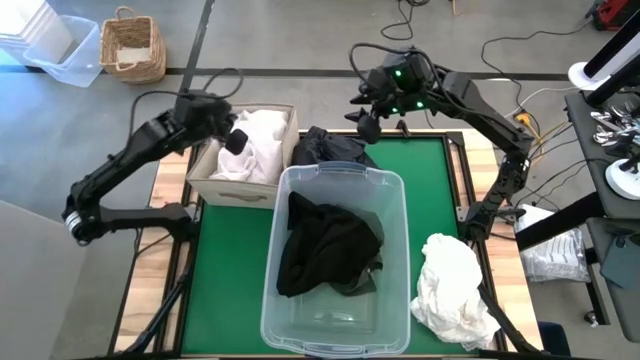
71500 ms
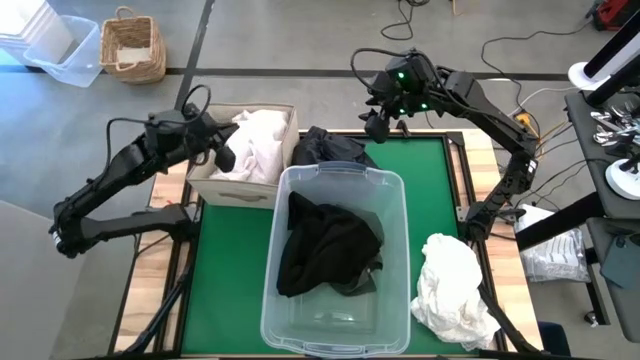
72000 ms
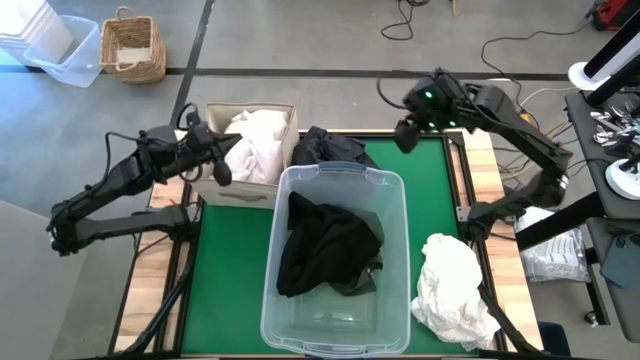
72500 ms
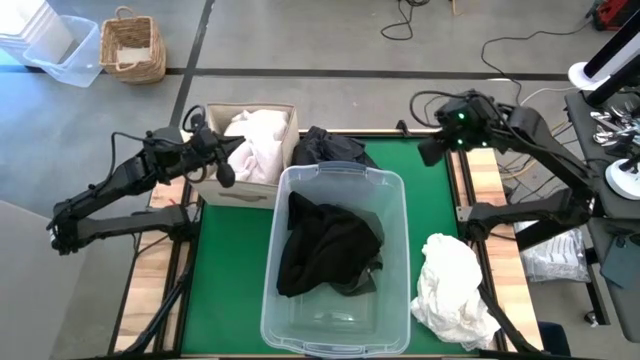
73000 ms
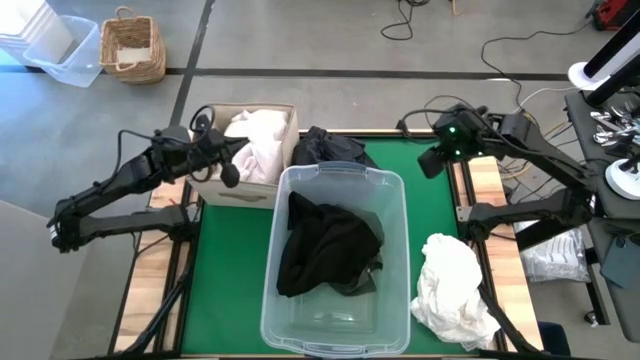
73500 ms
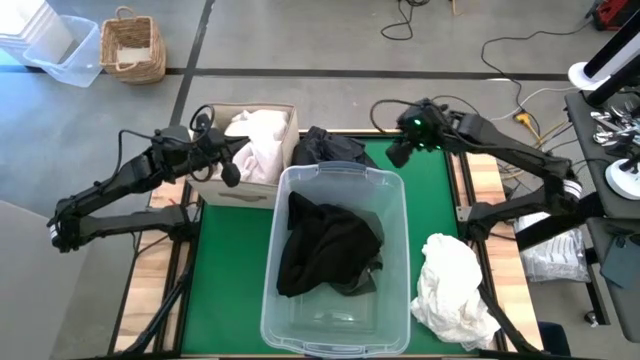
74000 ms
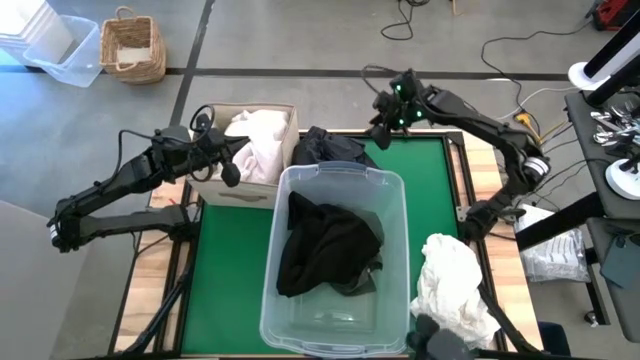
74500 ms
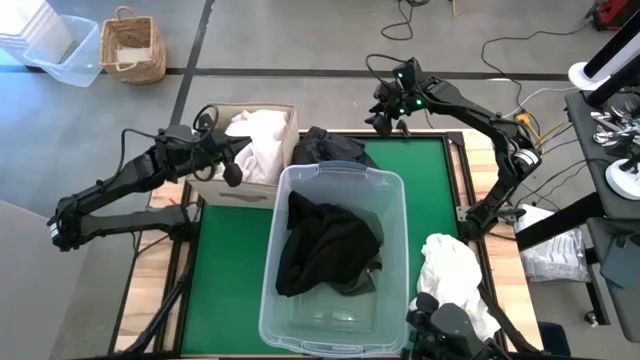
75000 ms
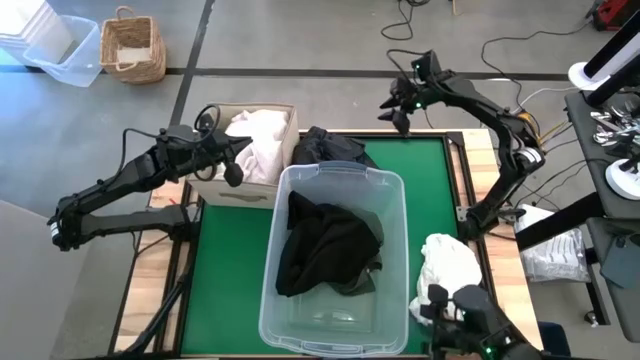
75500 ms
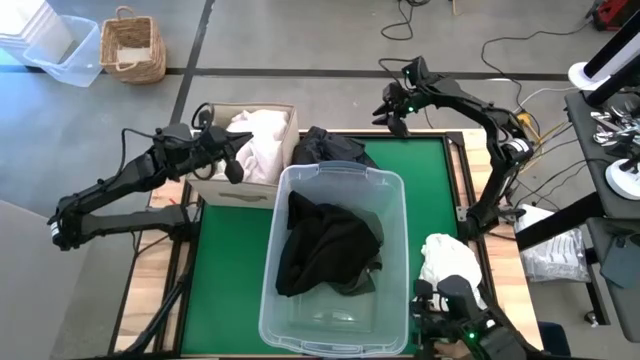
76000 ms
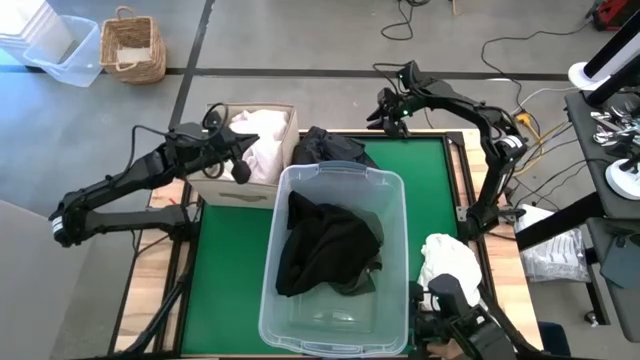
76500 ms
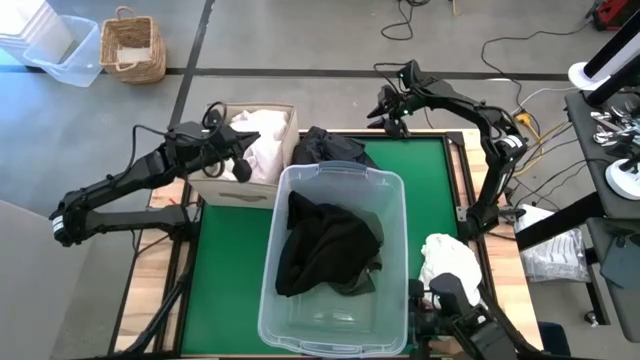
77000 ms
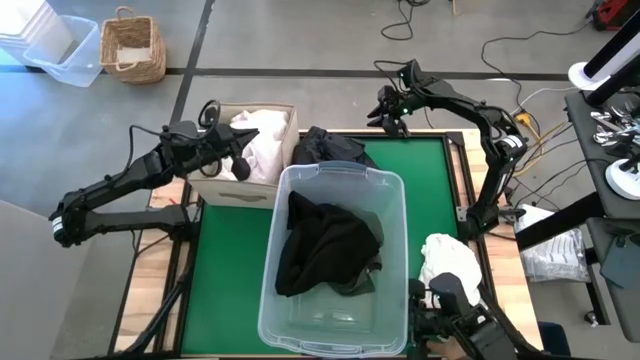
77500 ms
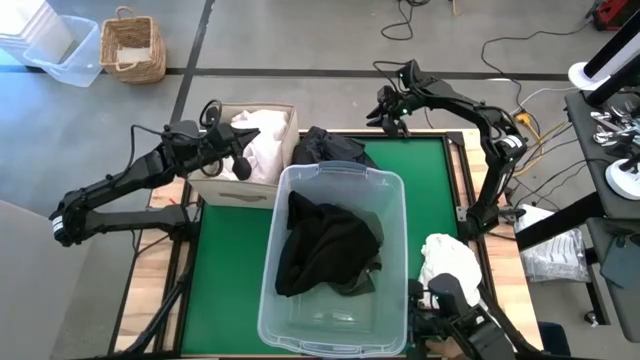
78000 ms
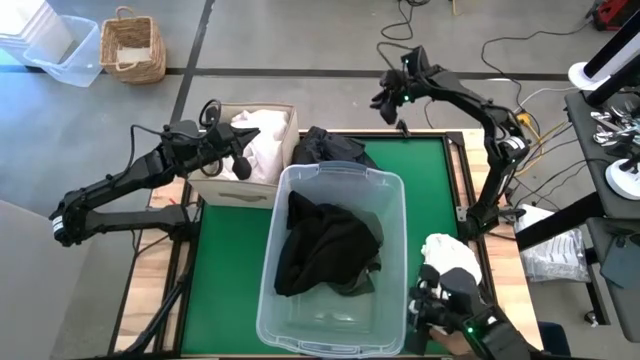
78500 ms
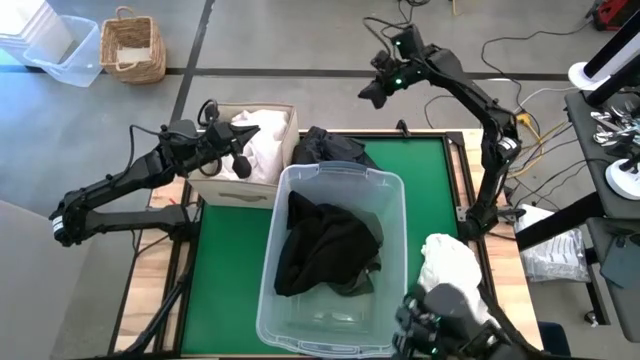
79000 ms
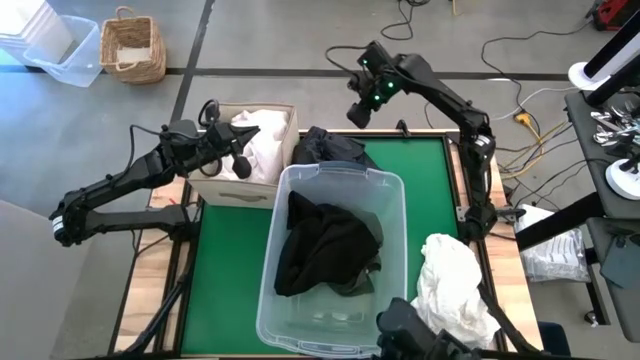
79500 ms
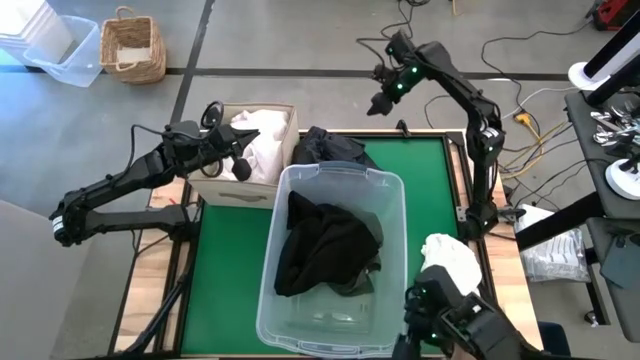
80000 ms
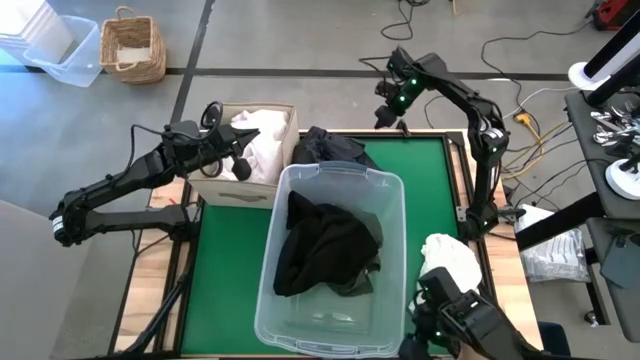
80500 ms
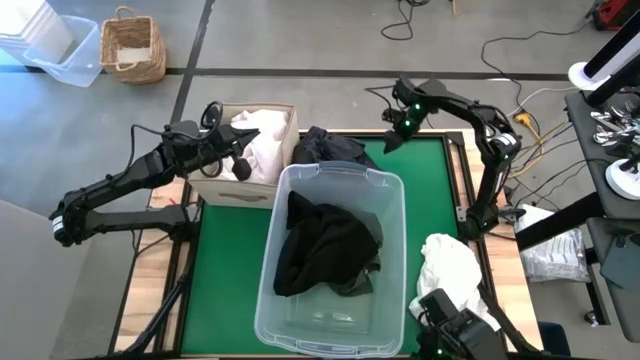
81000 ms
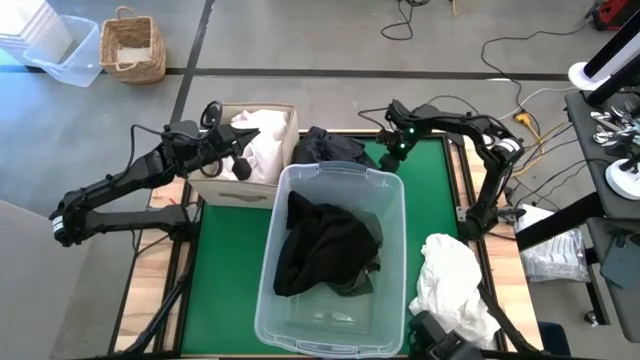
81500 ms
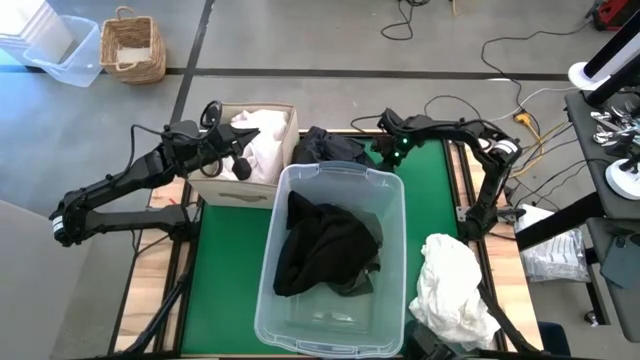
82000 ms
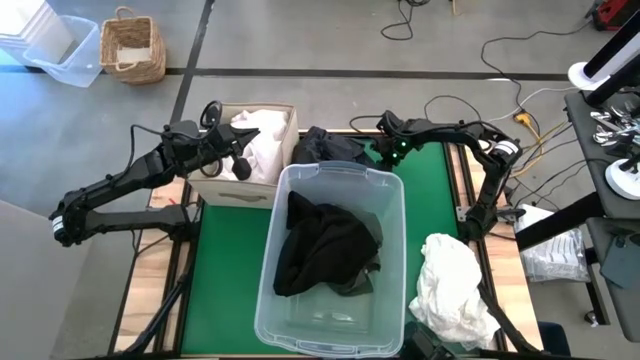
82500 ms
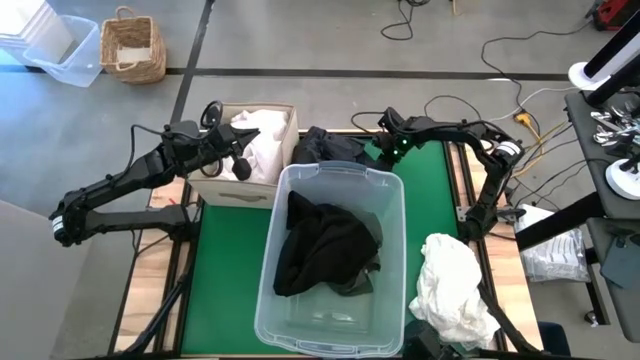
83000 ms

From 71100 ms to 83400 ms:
Put the black shorts into the transparent bin

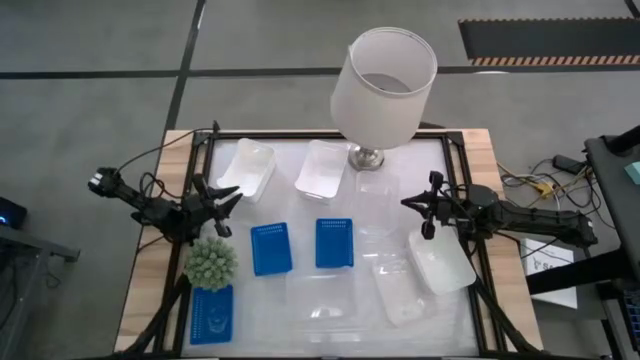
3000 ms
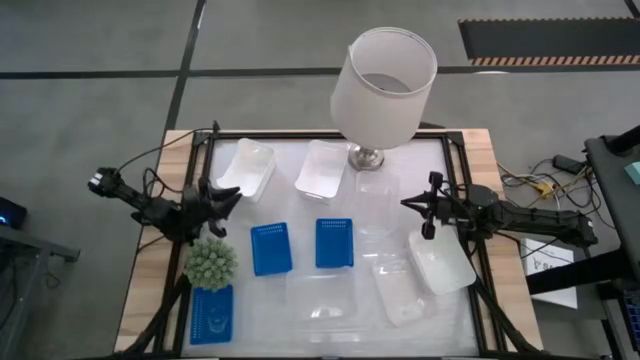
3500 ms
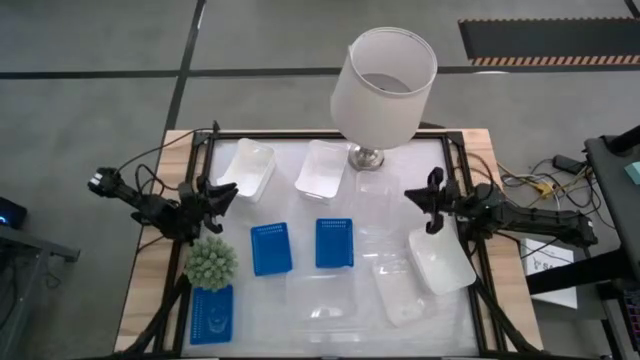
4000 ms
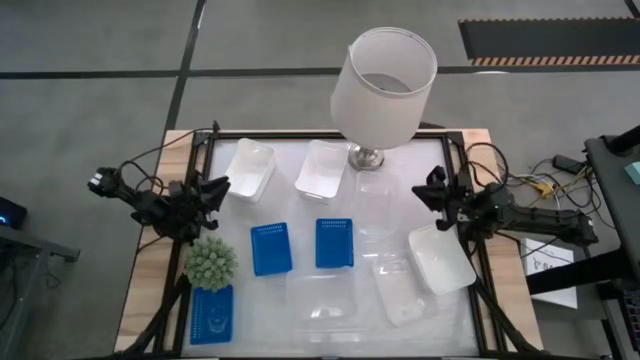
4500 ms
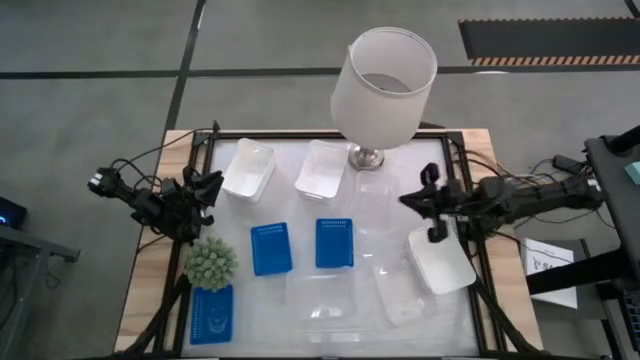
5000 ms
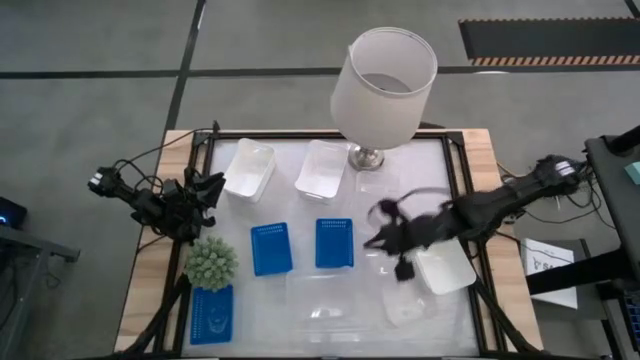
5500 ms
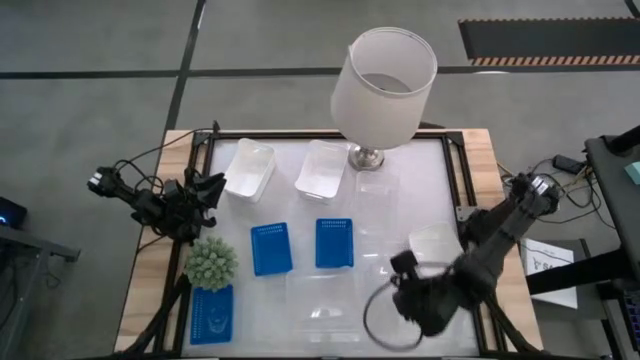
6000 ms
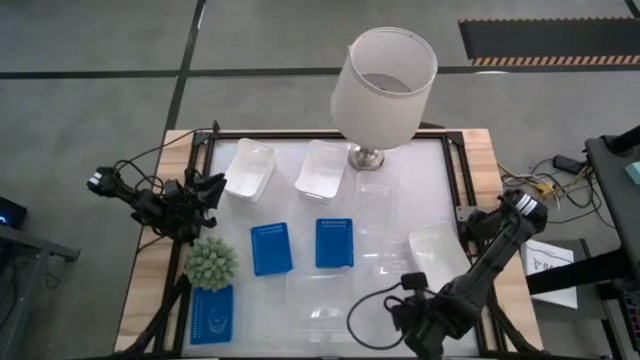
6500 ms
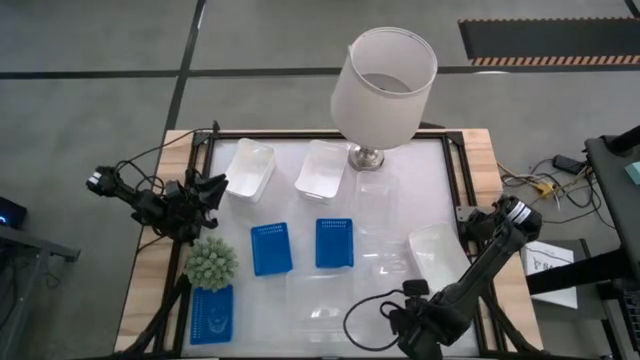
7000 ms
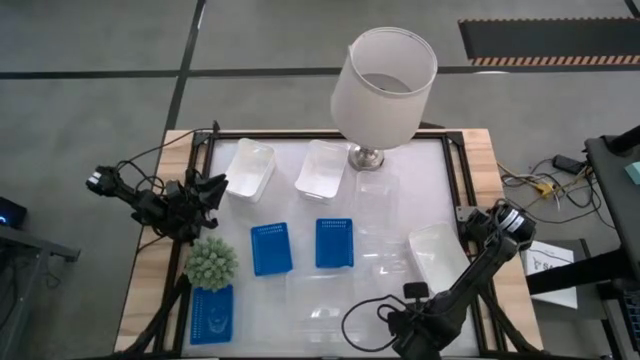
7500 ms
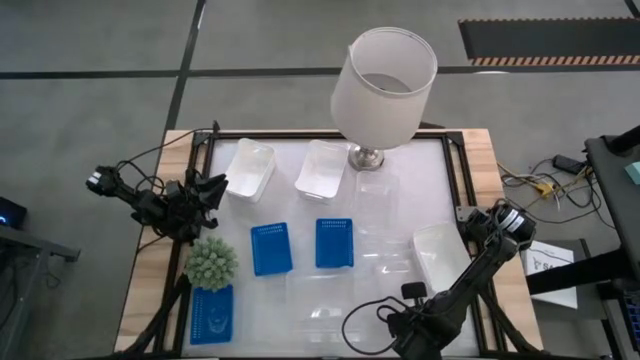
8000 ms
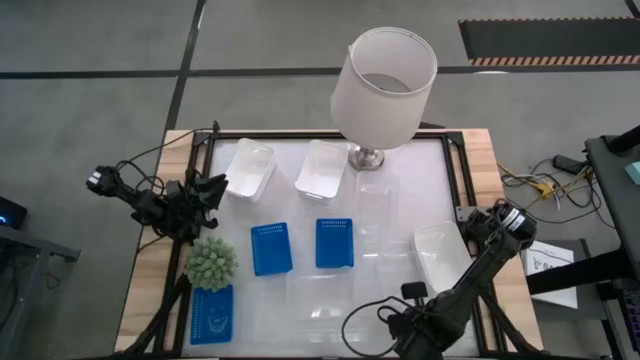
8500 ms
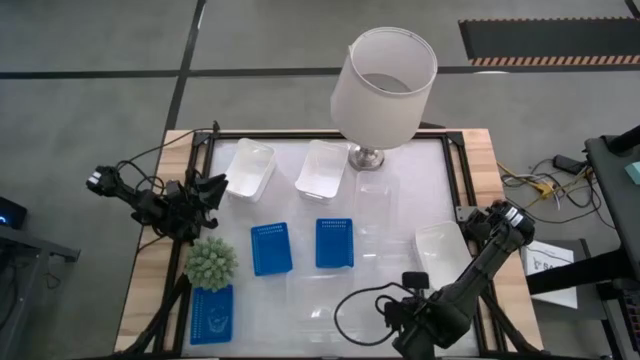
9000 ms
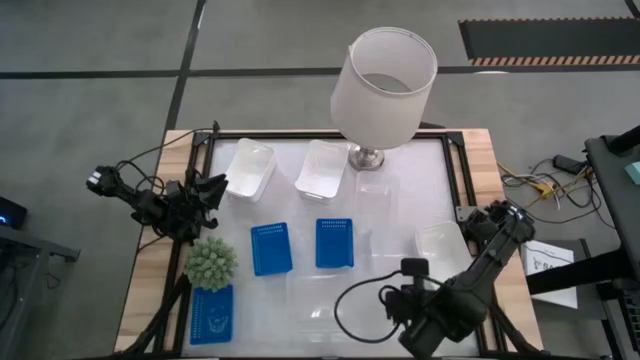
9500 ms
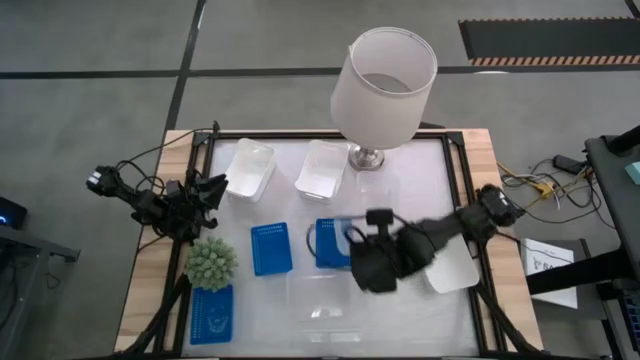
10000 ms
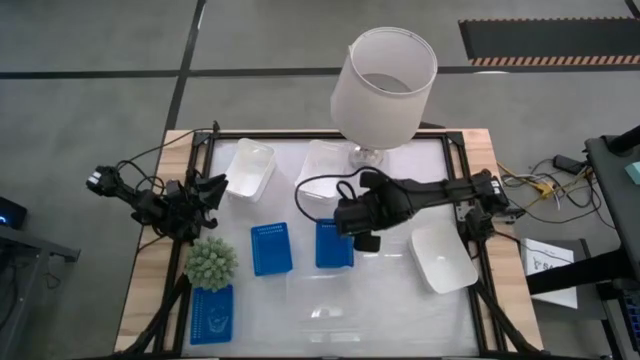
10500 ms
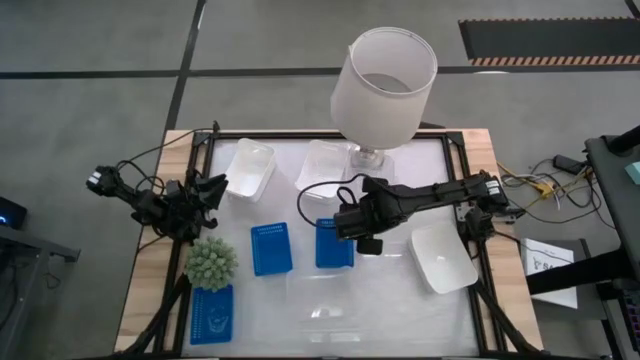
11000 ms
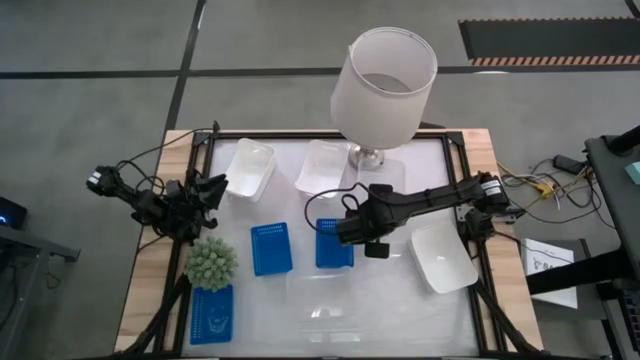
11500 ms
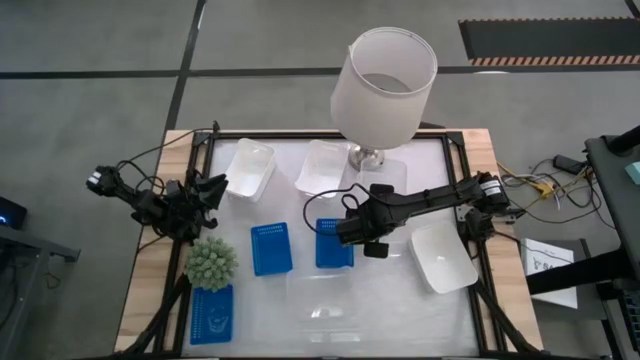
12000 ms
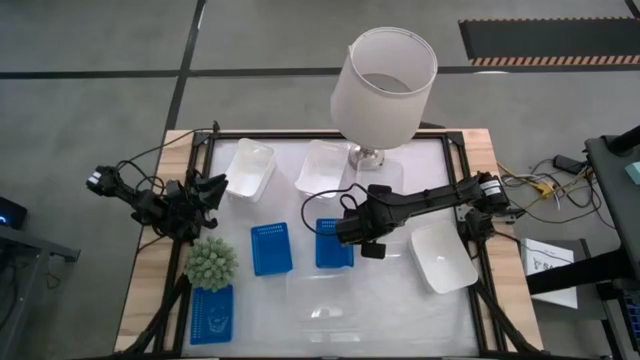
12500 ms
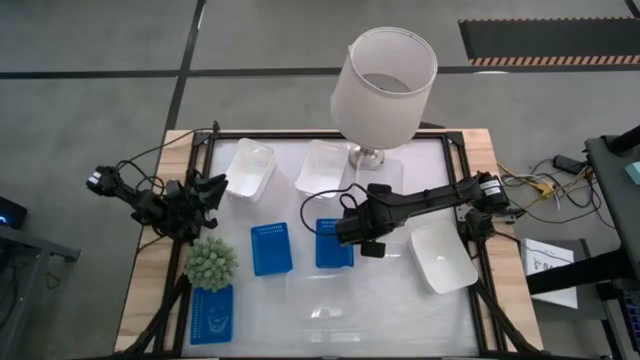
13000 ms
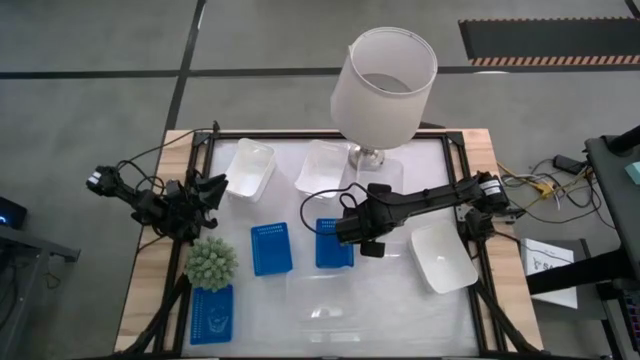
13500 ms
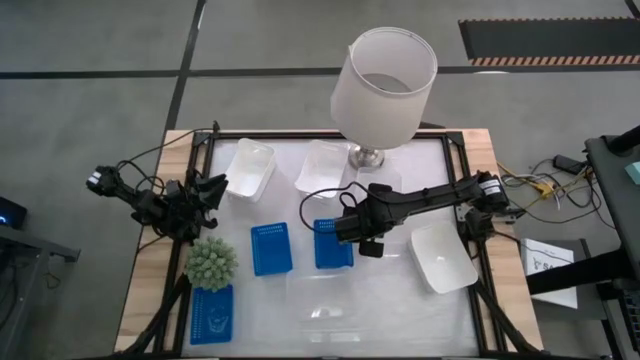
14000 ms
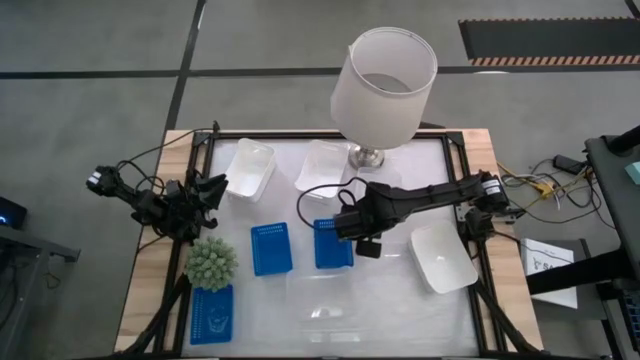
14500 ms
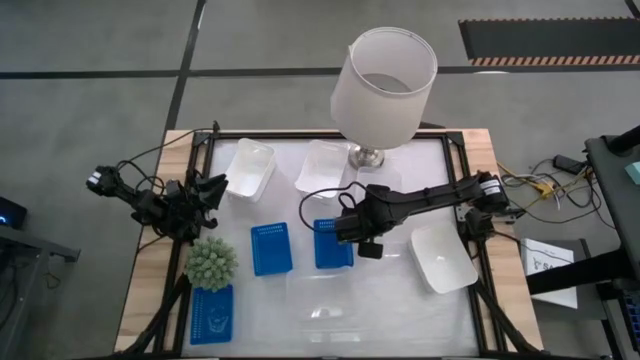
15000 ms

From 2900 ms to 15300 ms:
Stack the bottom right transparent bin on the top transparent bin
